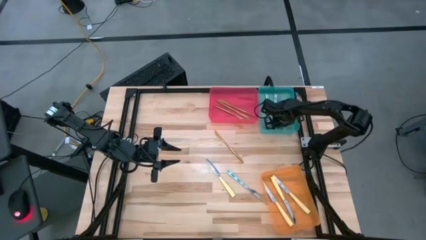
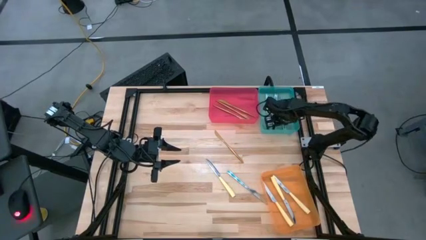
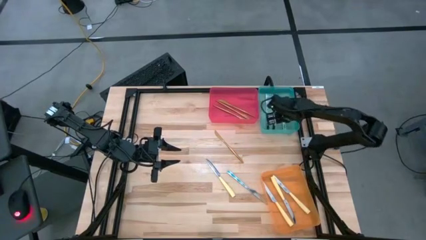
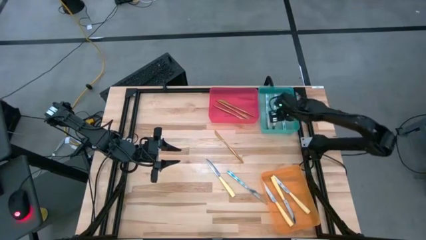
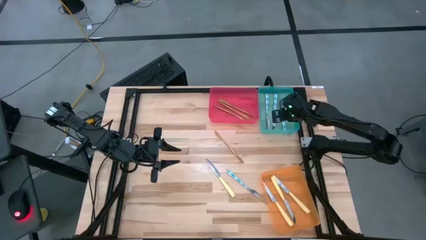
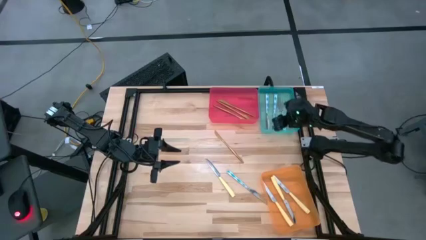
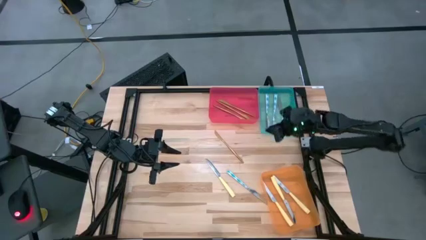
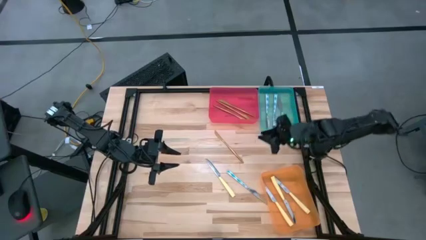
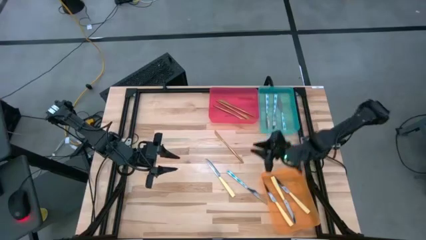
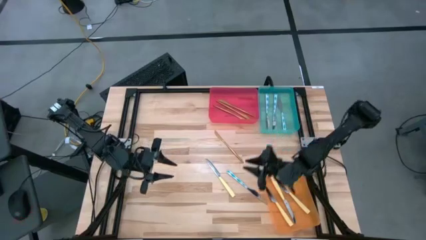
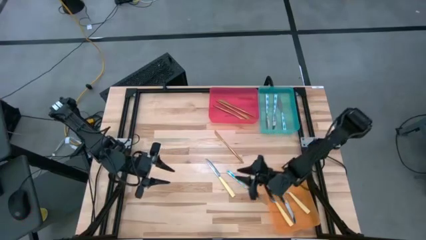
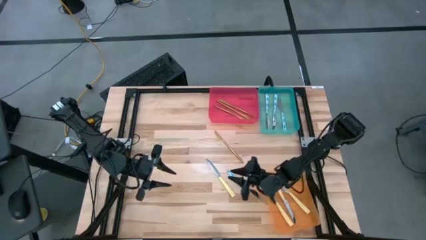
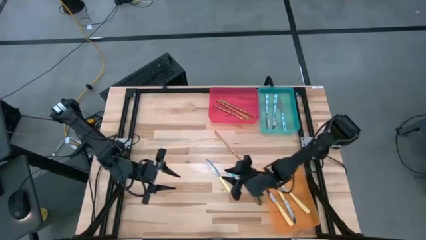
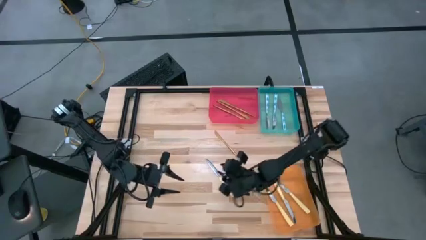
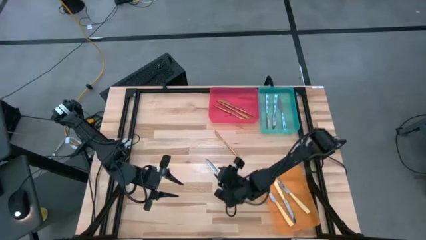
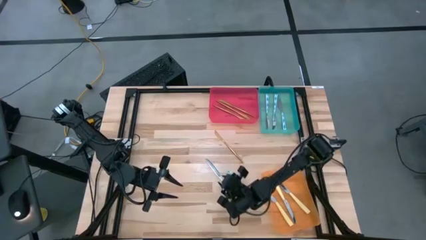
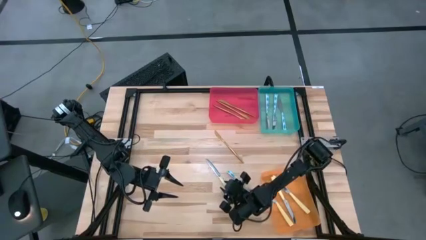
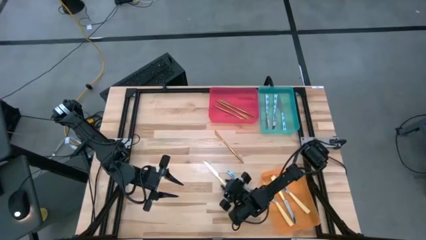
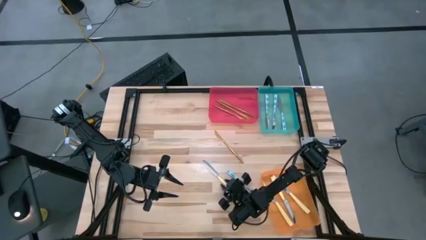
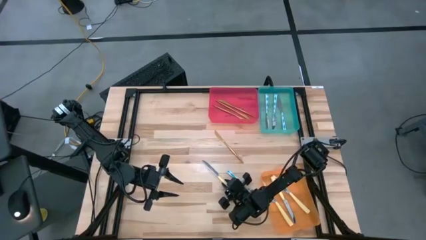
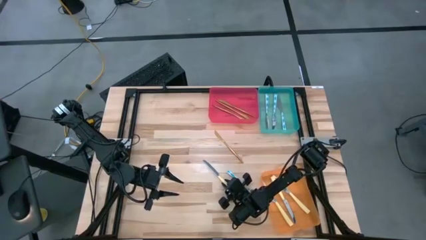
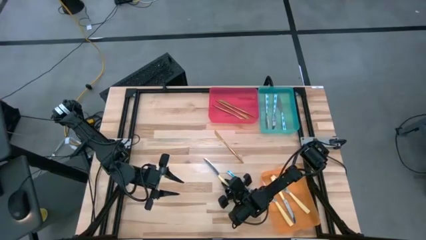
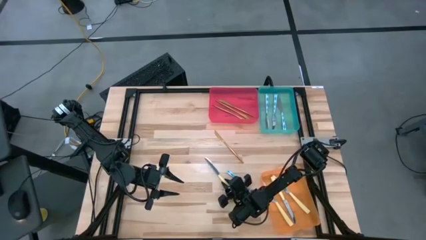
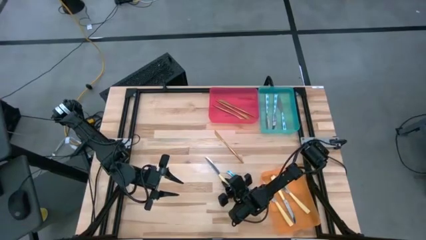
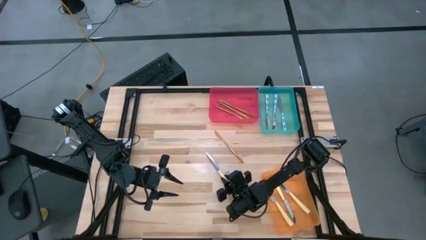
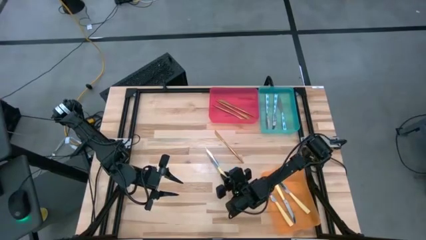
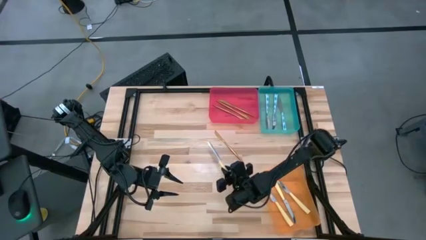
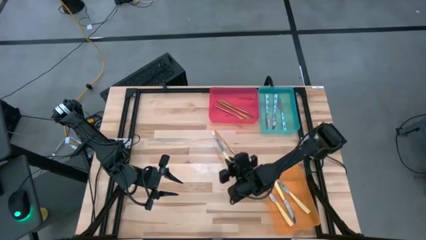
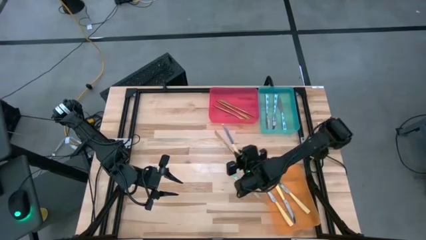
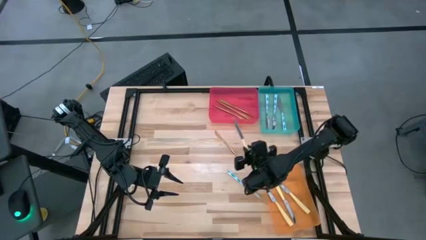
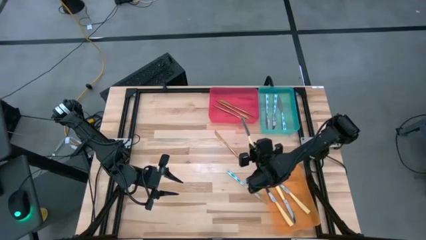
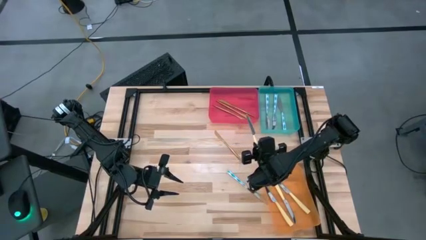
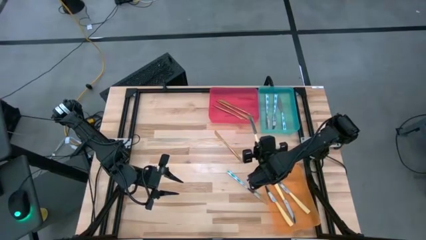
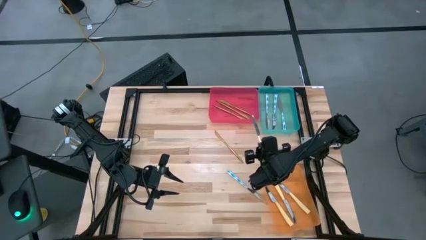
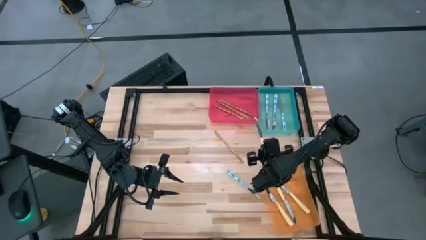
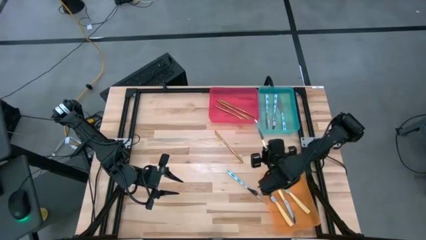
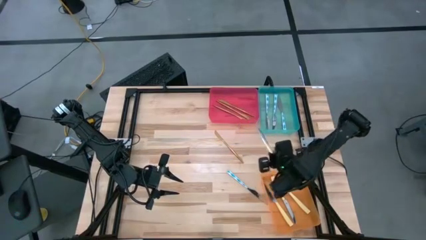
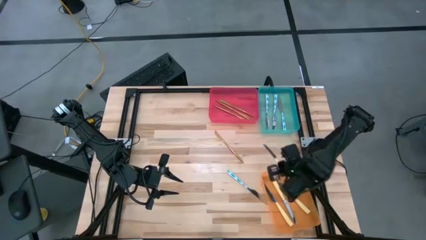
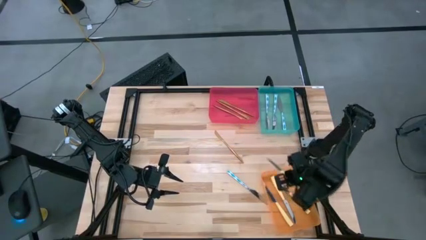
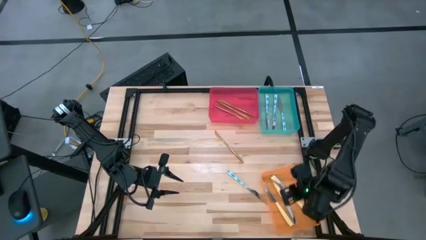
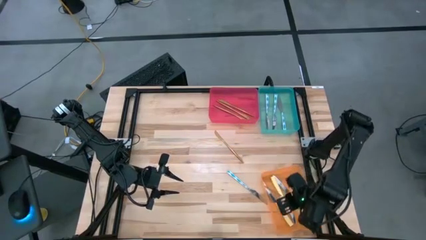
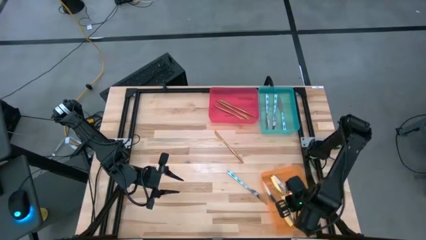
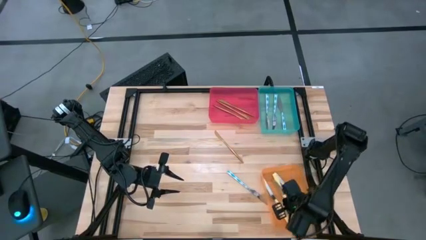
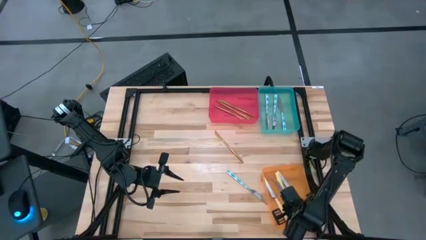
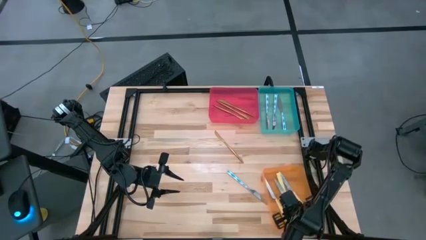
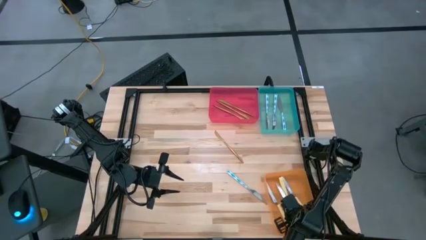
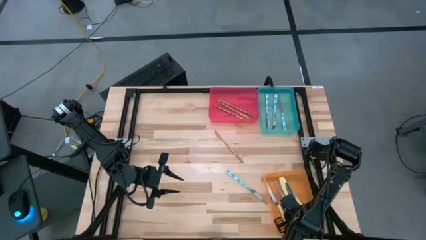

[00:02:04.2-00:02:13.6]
Task: Sort silverware by color (type)
Put the yellow knife into the orange bin

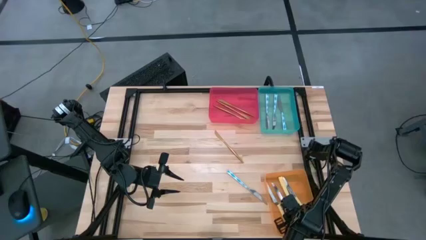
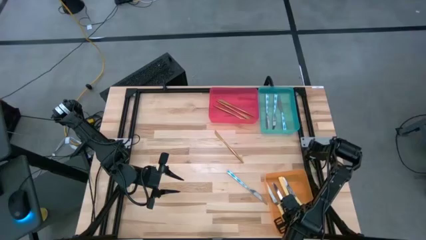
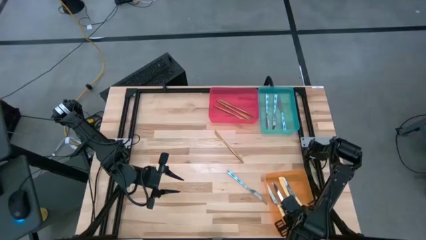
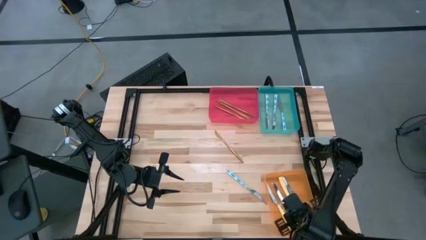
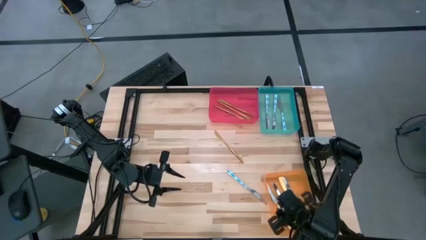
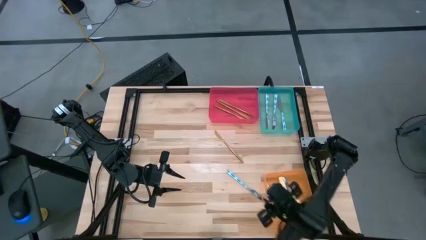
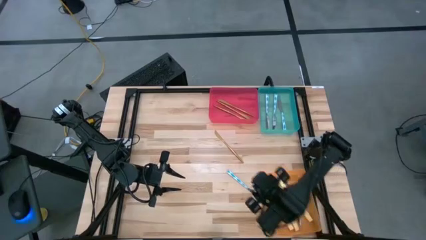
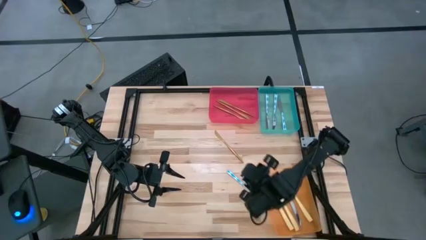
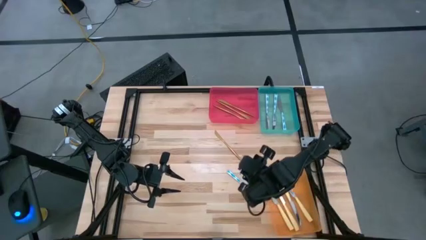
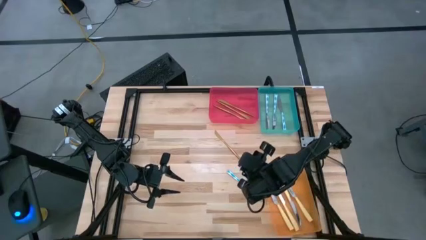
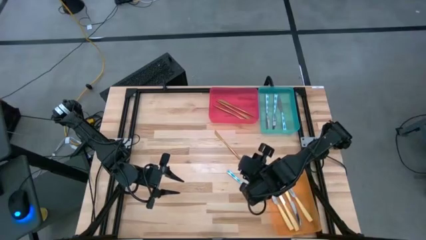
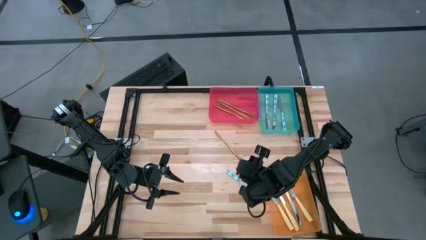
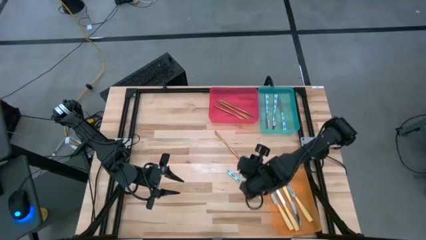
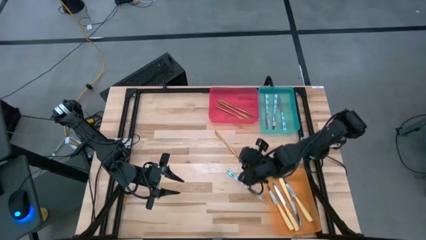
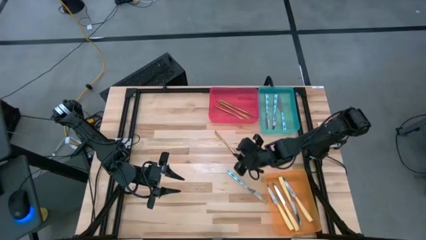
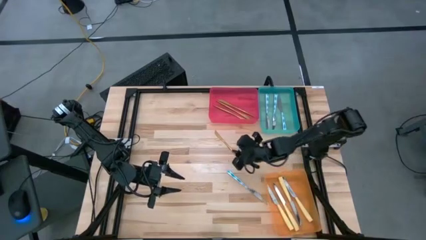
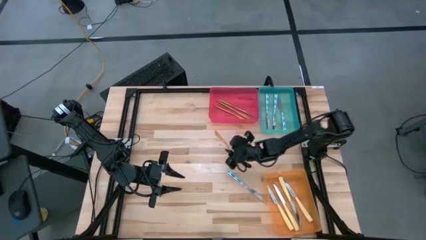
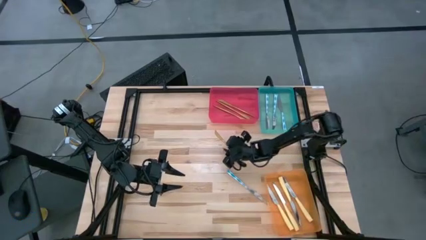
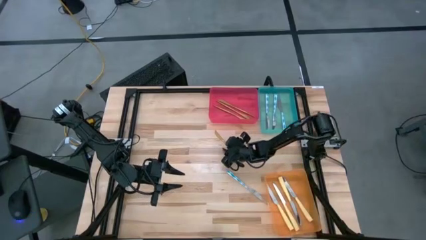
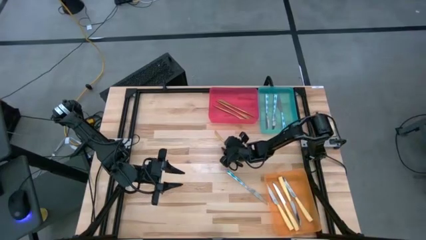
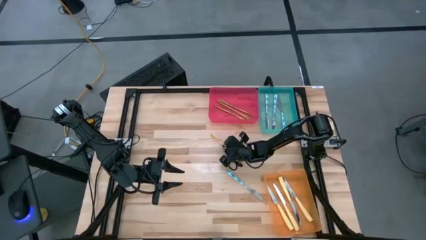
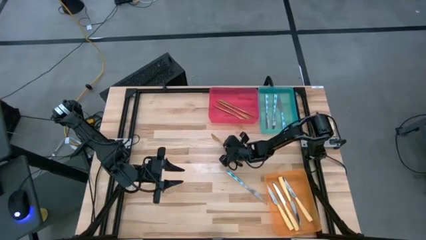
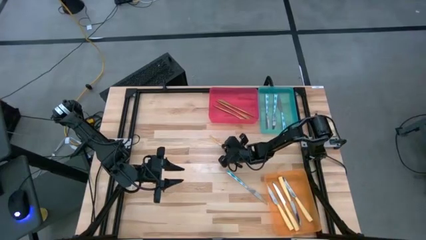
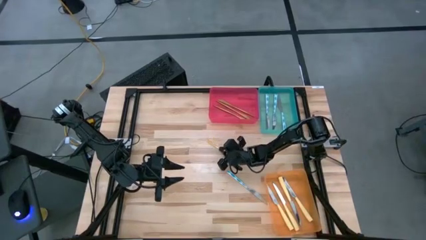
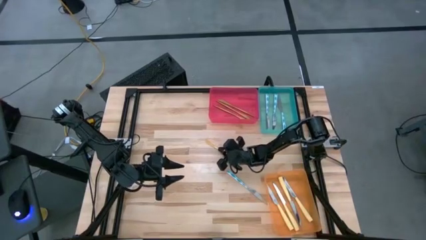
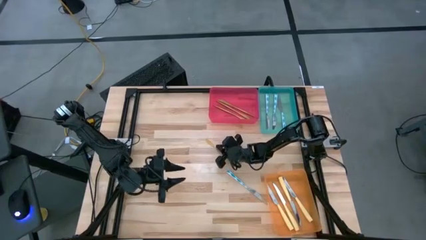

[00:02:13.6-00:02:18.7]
Put the golden knife into the red bin
